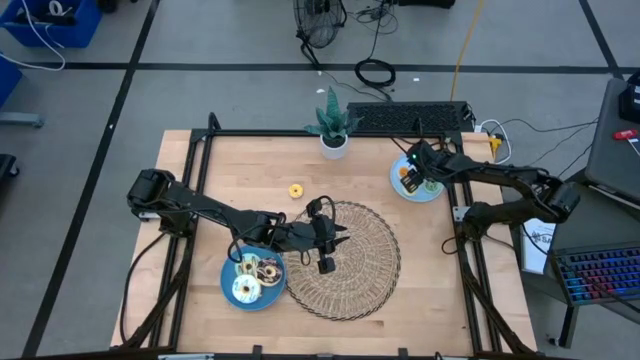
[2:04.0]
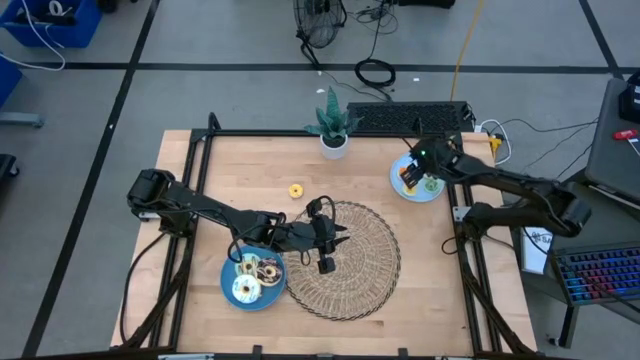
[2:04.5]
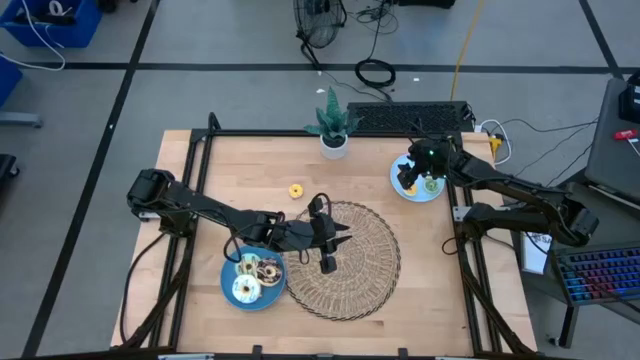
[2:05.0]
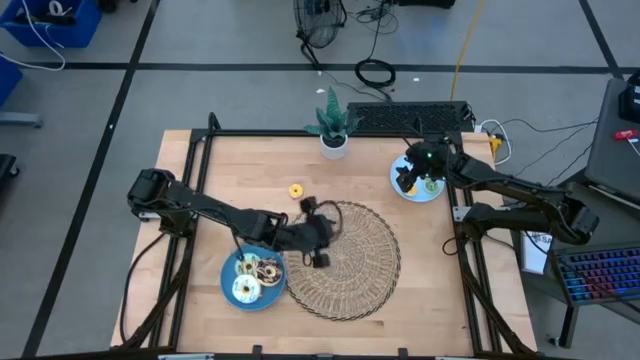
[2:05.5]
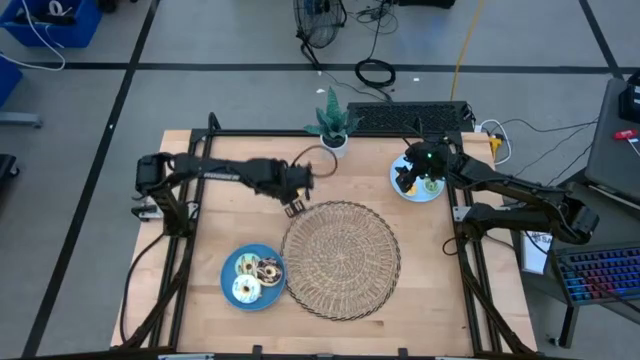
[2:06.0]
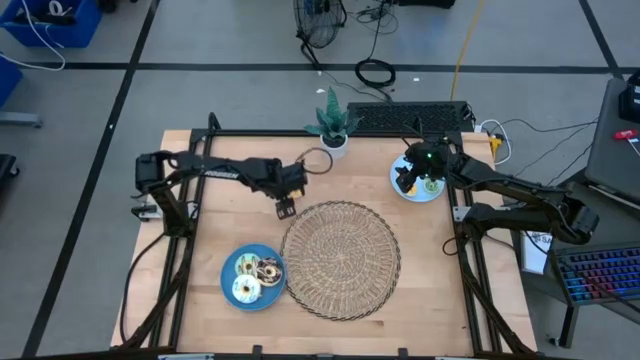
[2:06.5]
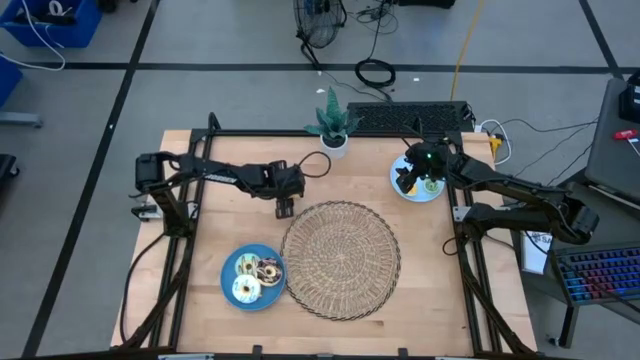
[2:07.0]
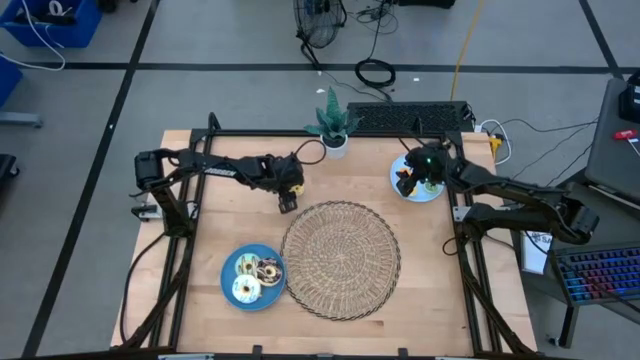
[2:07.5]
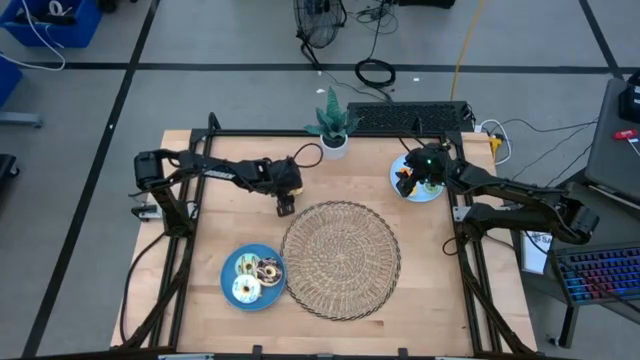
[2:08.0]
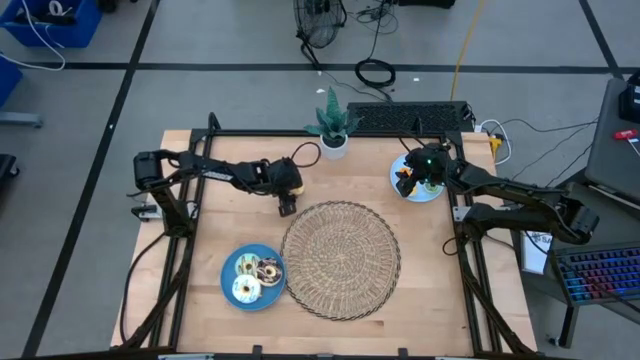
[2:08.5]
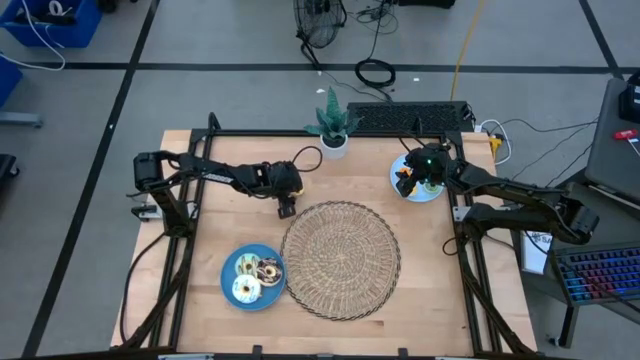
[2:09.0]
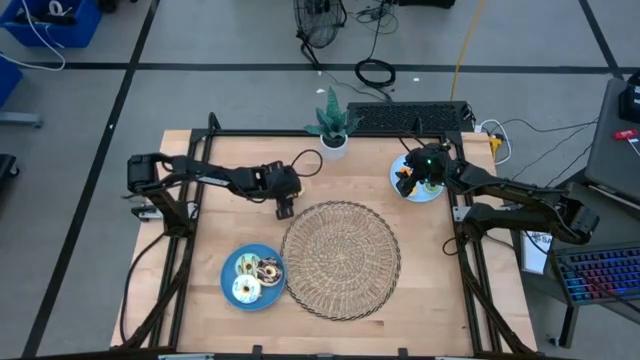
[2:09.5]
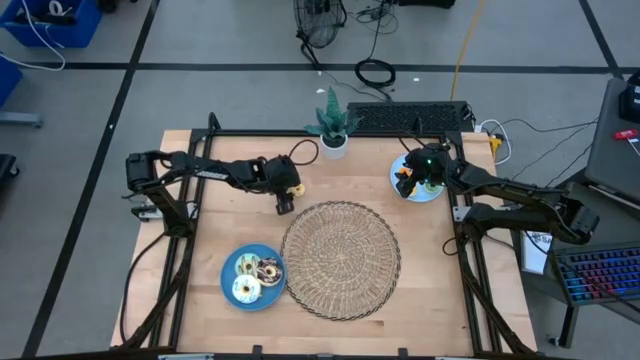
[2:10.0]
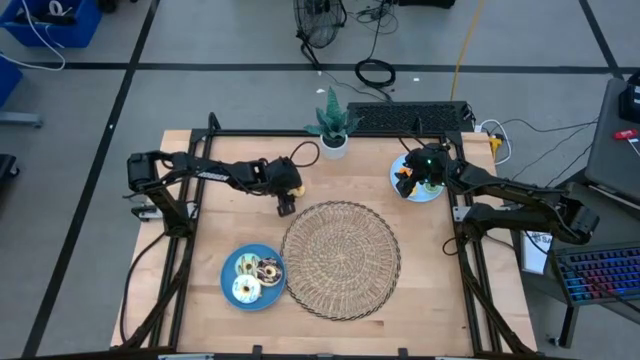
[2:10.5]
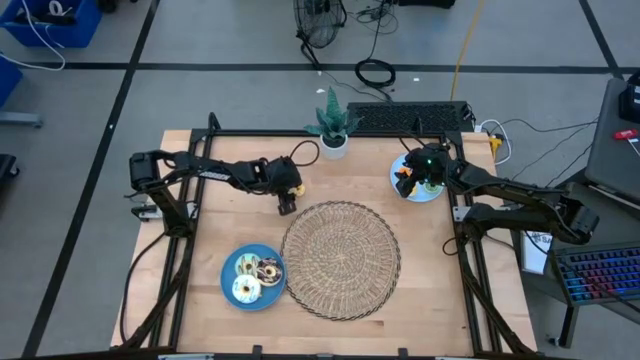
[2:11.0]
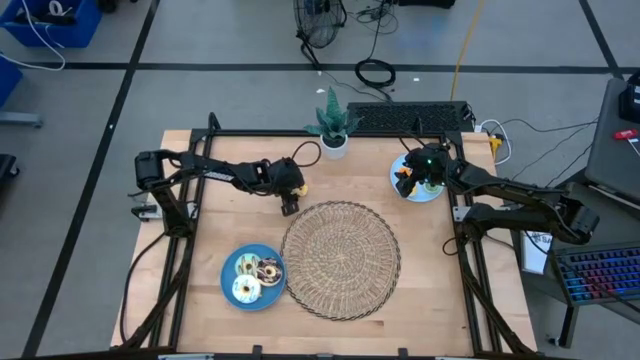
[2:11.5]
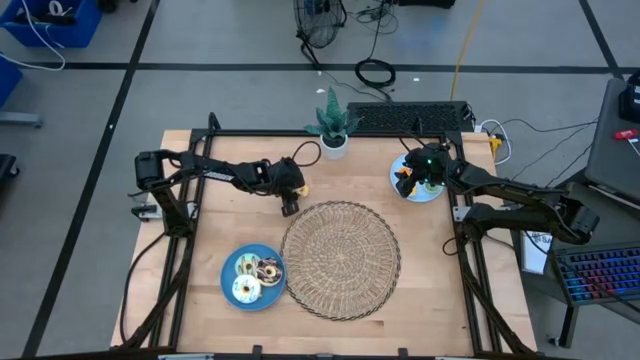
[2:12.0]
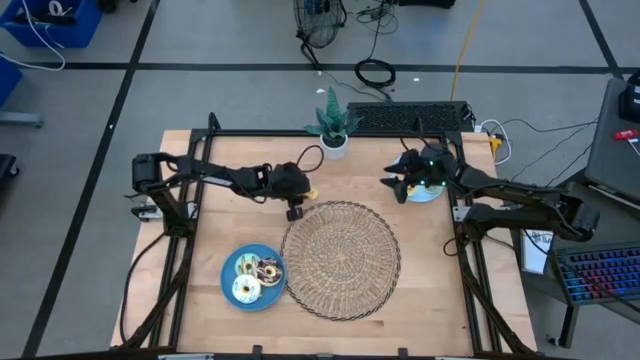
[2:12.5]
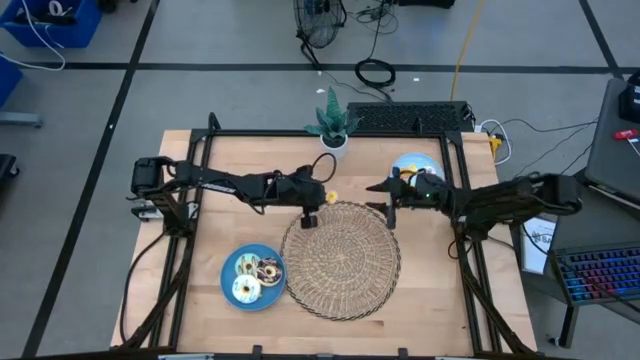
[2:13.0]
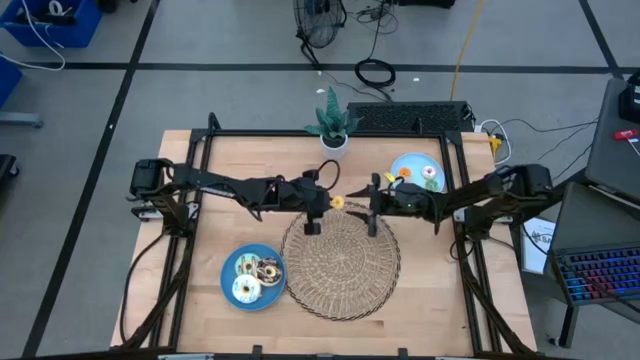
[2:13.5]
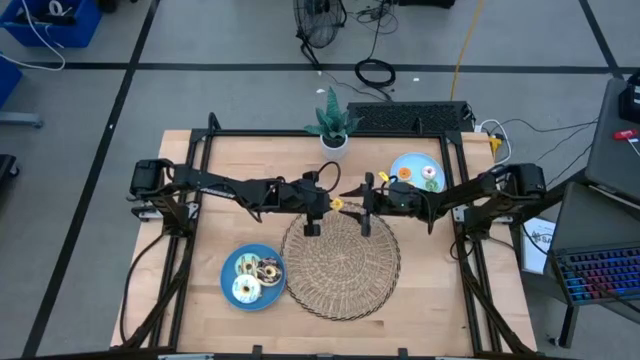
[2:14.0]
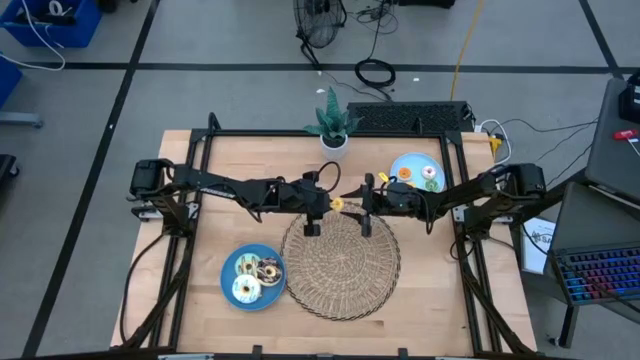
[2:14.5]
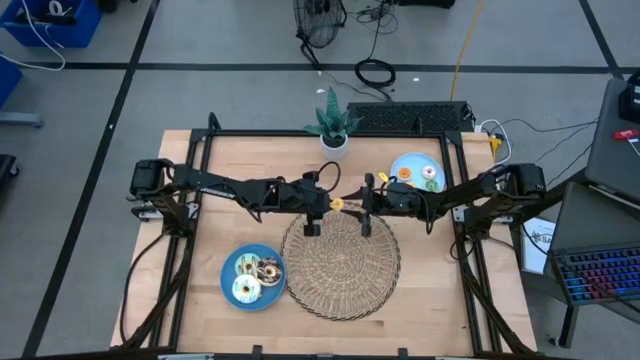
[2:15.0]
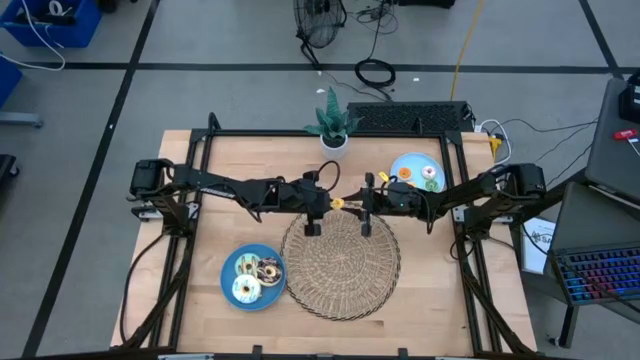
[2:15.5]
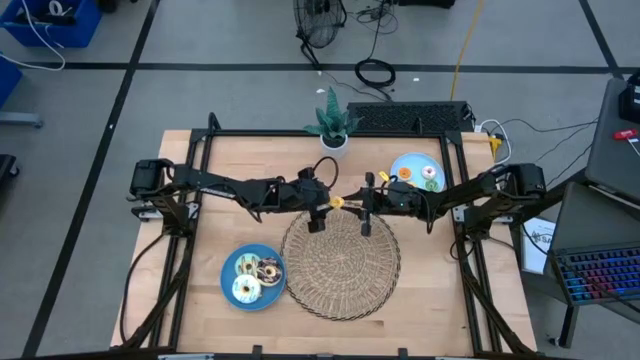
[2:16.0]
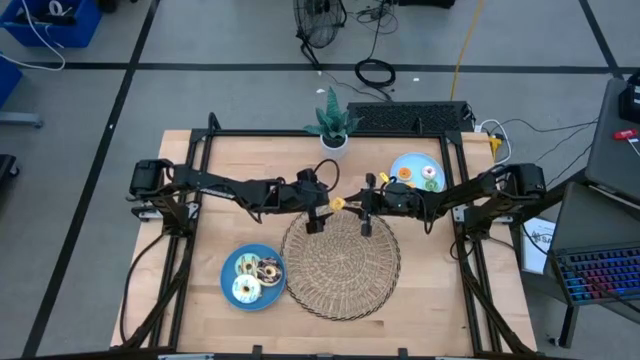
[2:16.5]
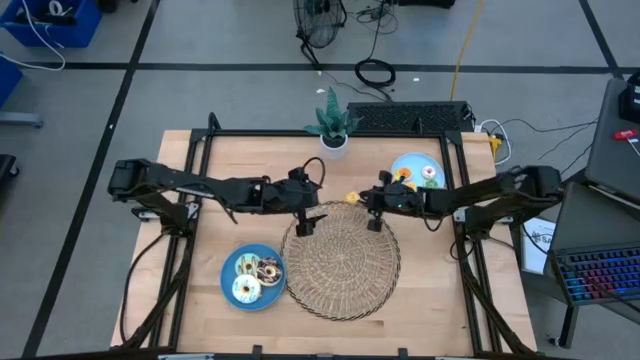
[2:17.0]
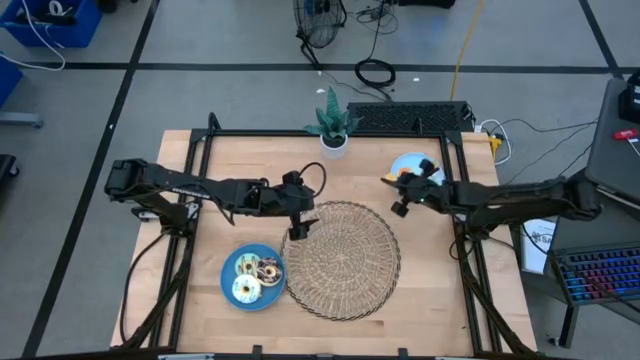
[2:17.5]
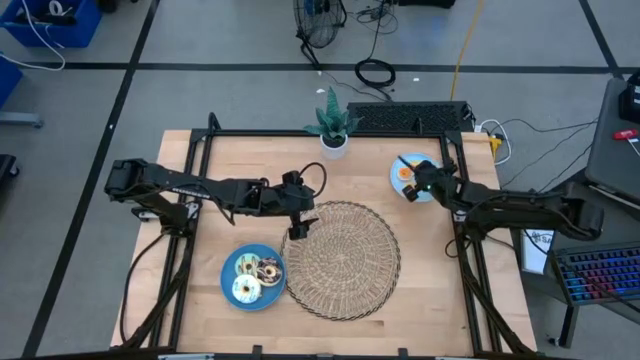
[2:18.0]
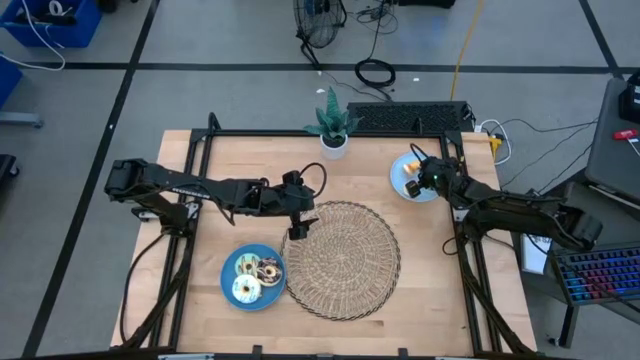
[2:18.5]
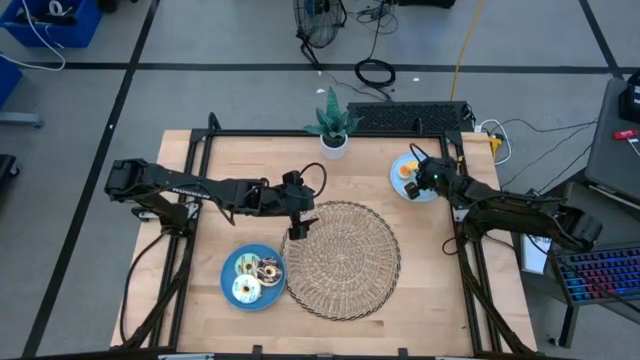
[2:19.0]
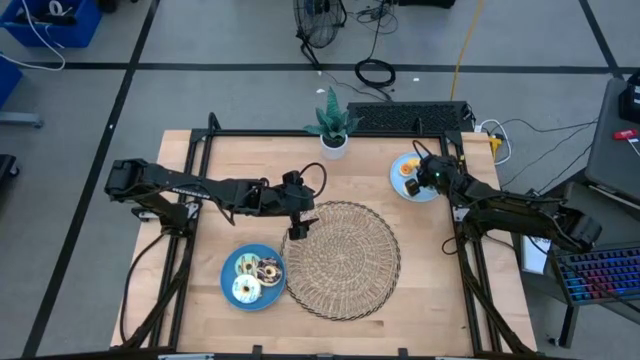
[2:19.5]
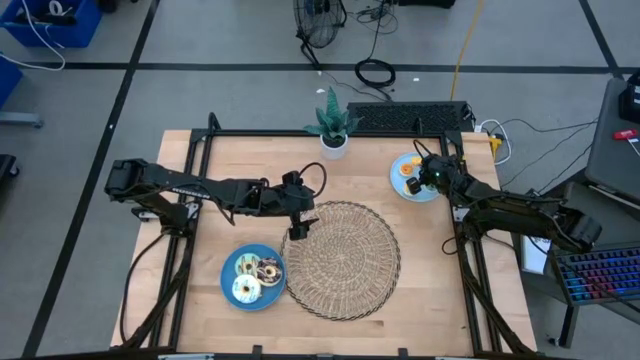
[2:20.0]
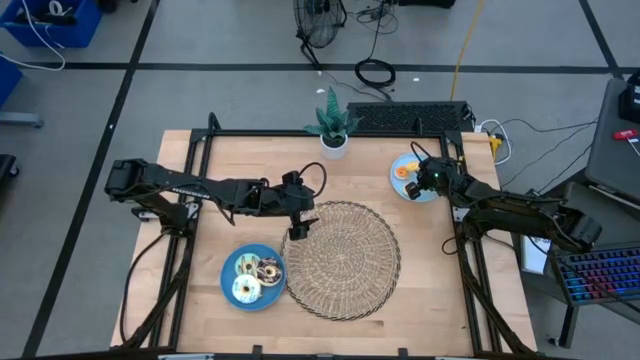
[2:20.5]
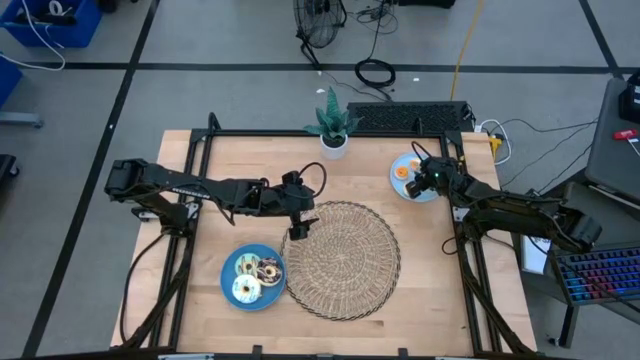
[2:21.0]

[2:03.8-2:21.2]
Task: Pick & Place donuts
Put the small yellow donut on the light blue plate

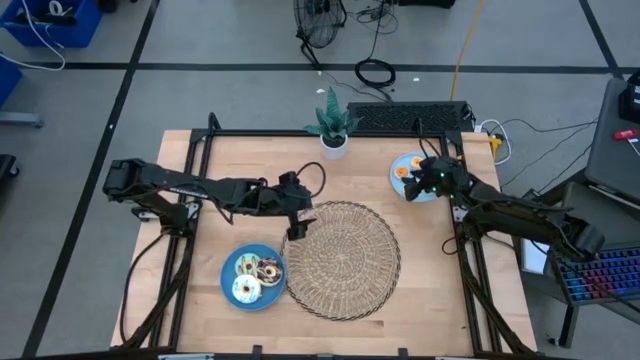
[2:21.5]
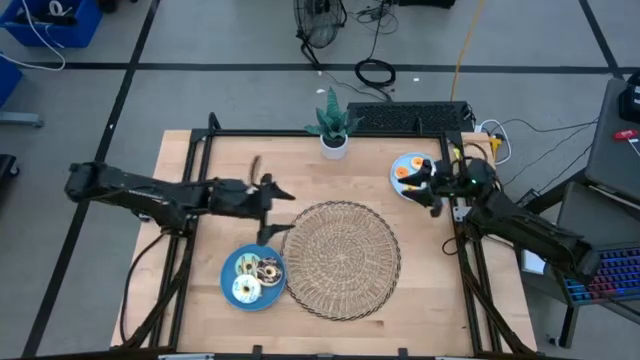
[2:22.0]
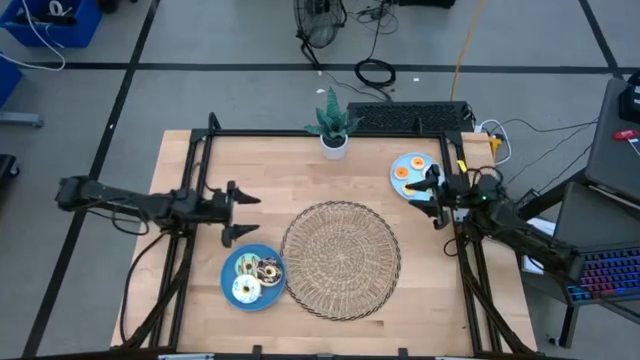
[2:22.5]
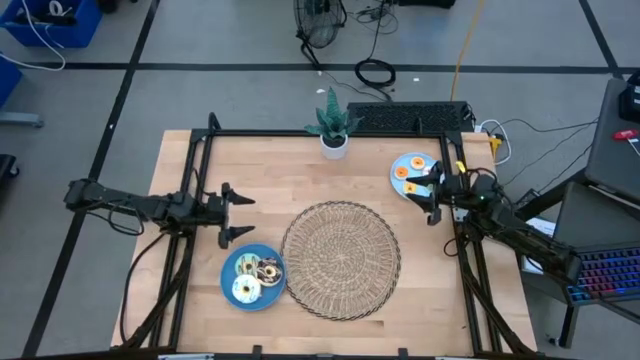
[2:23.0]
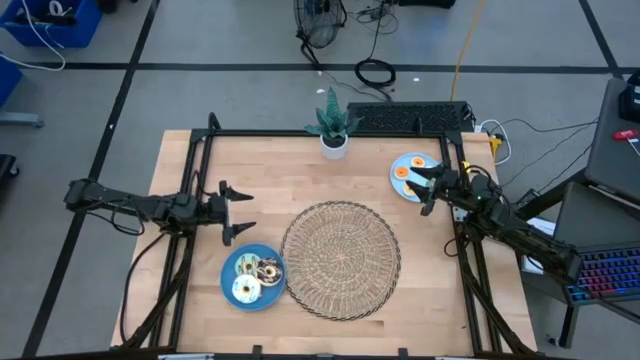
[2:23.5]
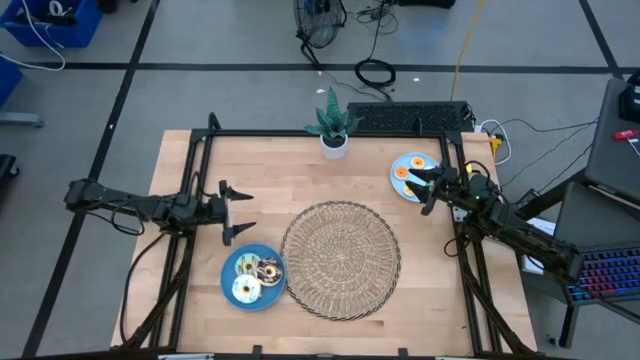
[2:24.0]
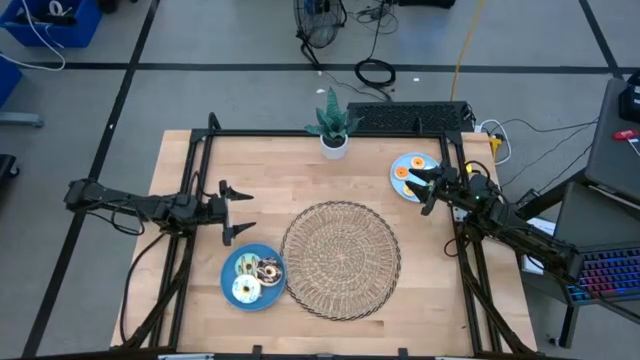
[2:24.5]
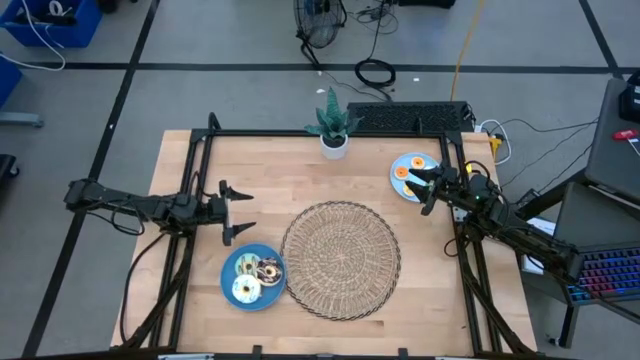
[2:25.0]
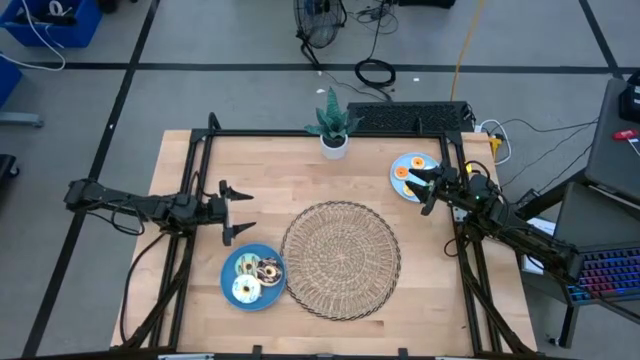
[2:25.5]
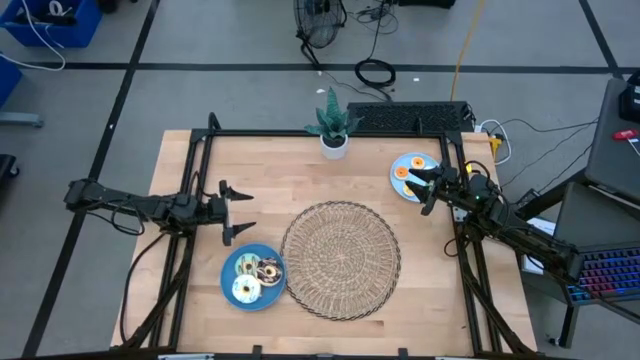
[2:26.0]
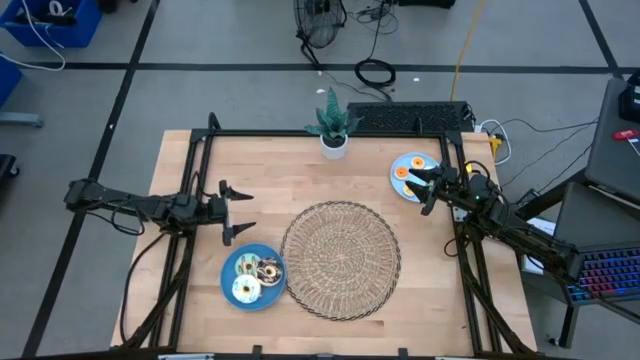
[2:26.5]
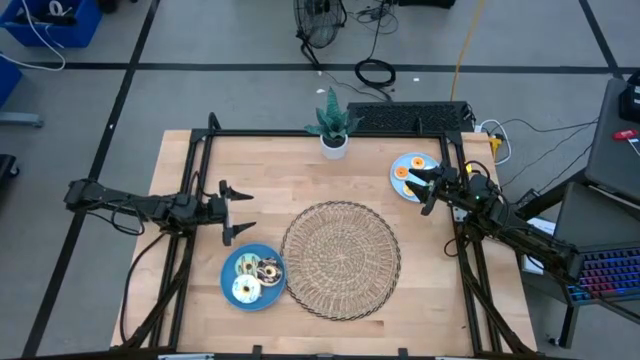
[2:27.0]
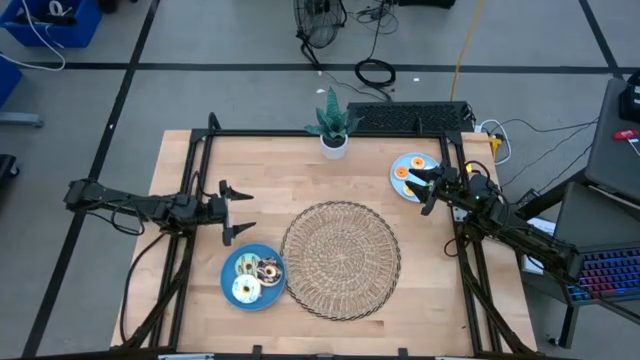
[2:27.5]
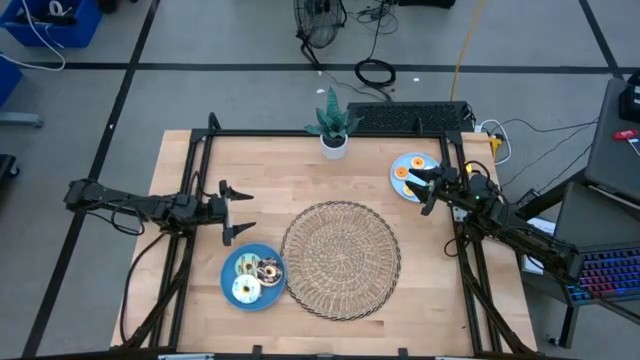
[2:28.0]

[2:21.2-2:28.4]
Return to Home Position
